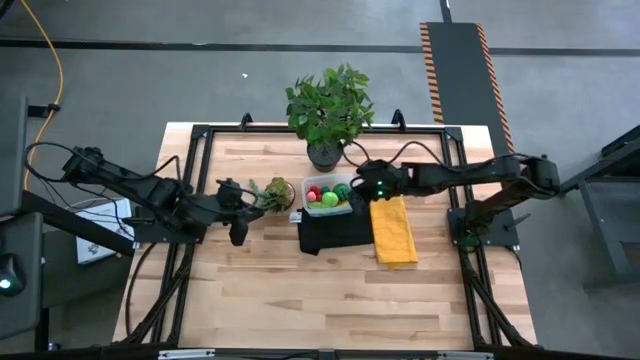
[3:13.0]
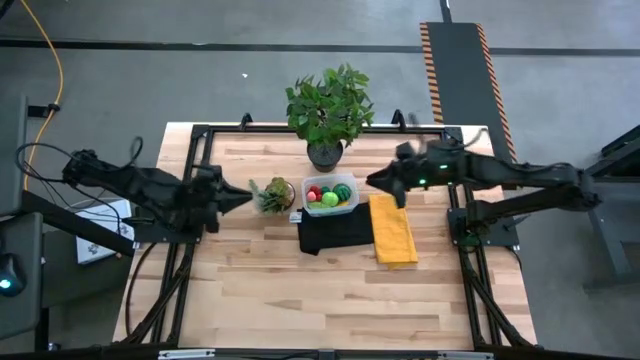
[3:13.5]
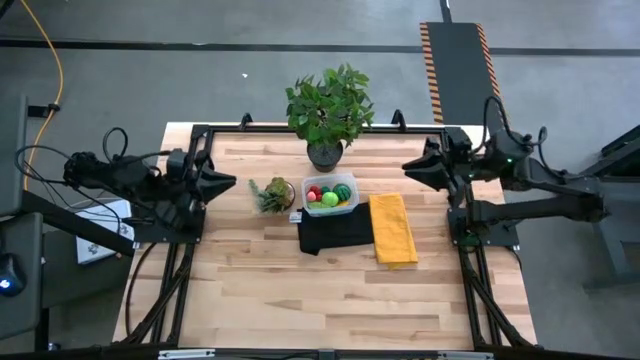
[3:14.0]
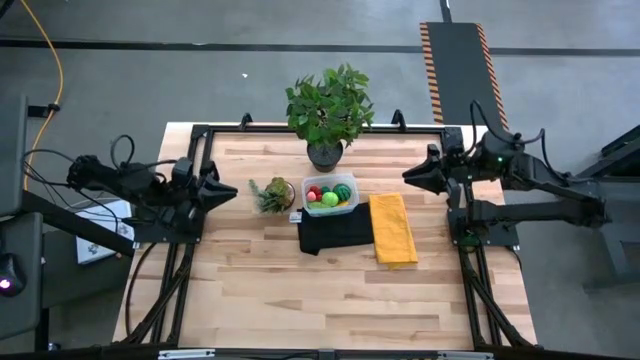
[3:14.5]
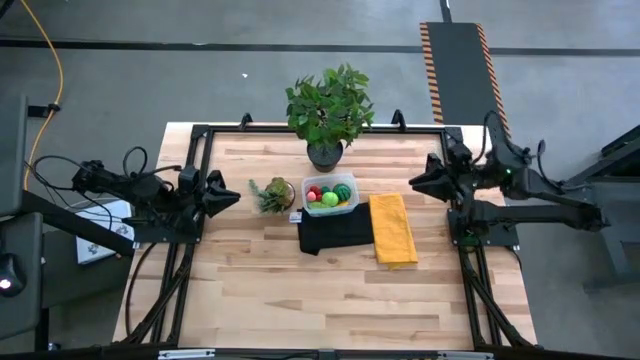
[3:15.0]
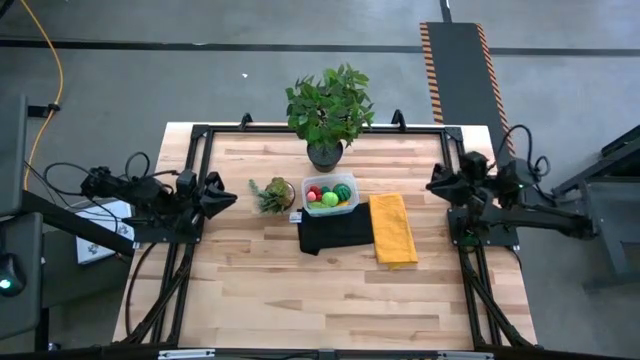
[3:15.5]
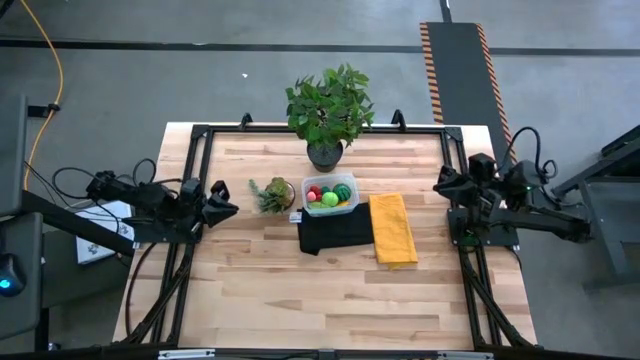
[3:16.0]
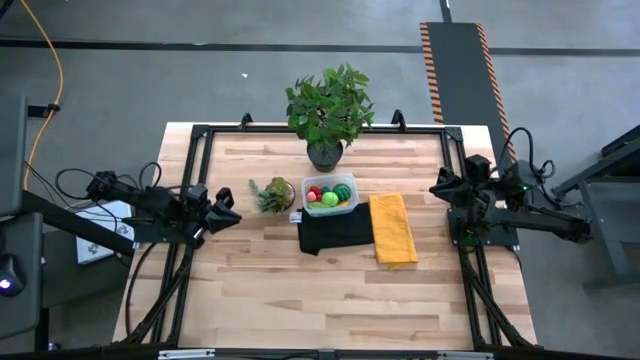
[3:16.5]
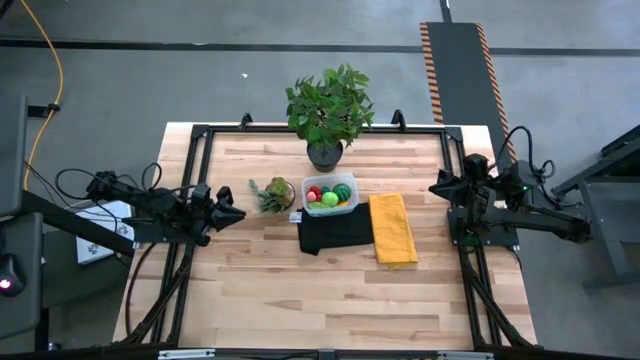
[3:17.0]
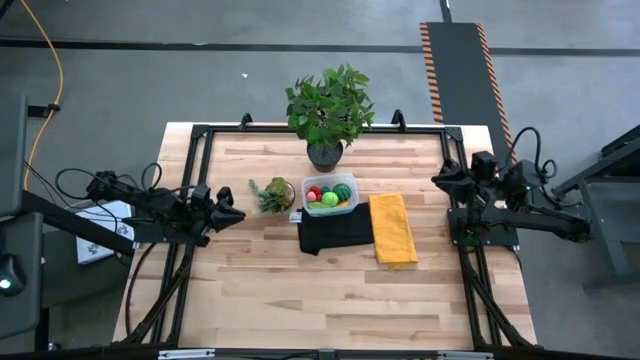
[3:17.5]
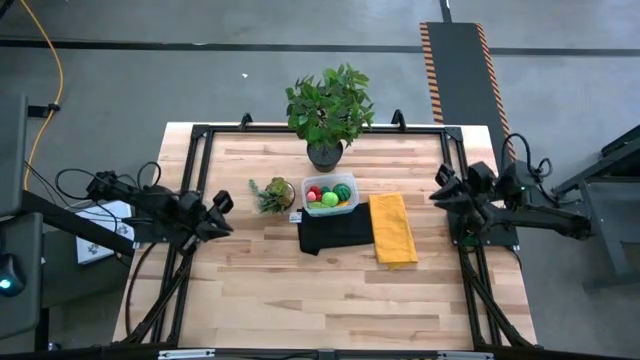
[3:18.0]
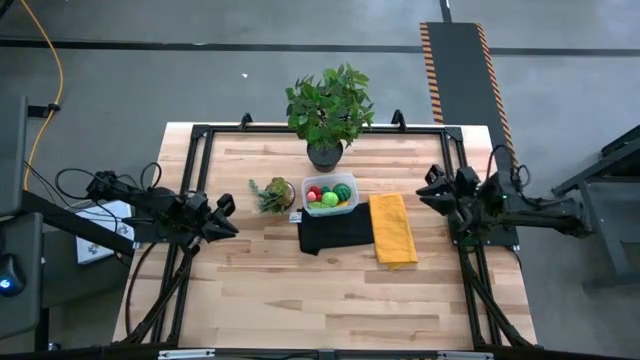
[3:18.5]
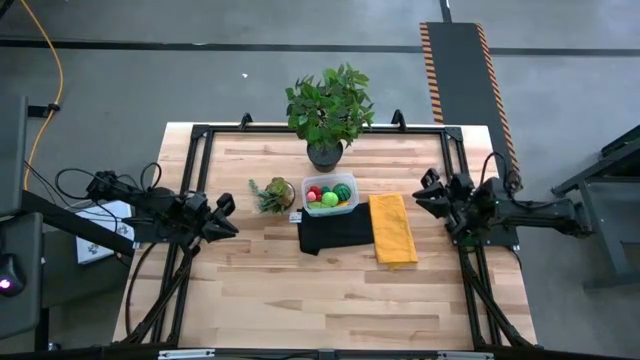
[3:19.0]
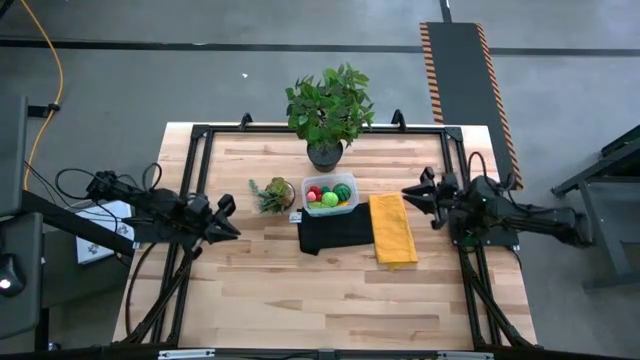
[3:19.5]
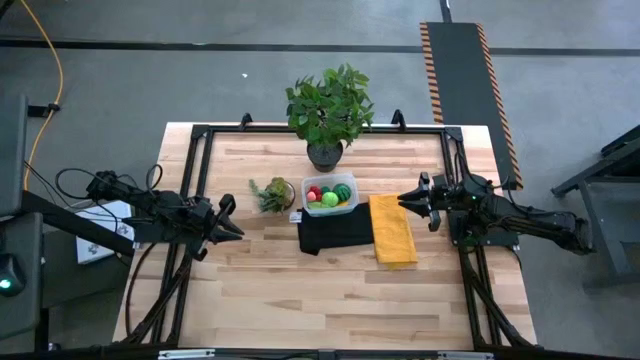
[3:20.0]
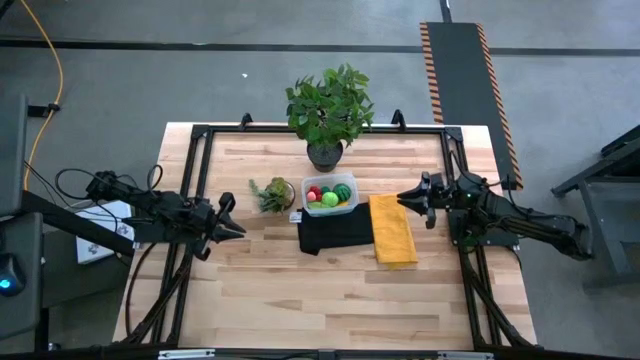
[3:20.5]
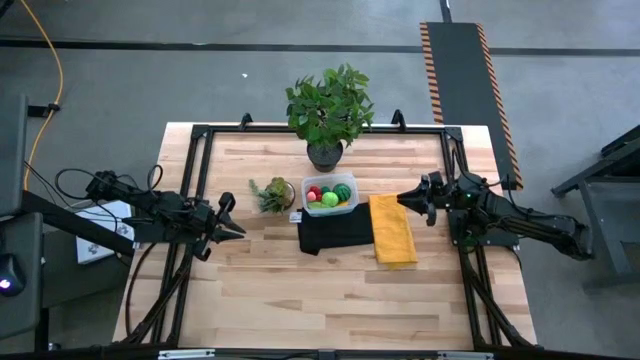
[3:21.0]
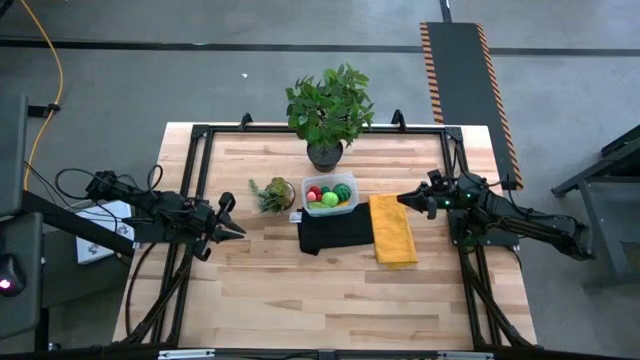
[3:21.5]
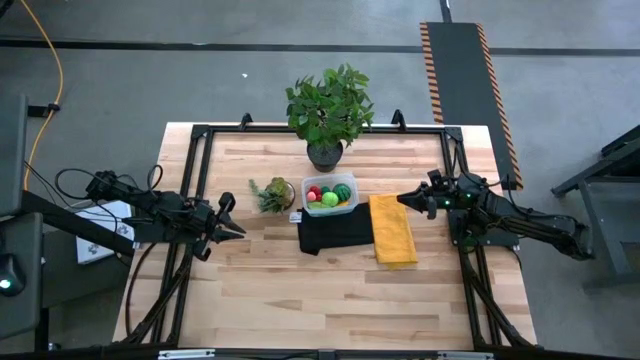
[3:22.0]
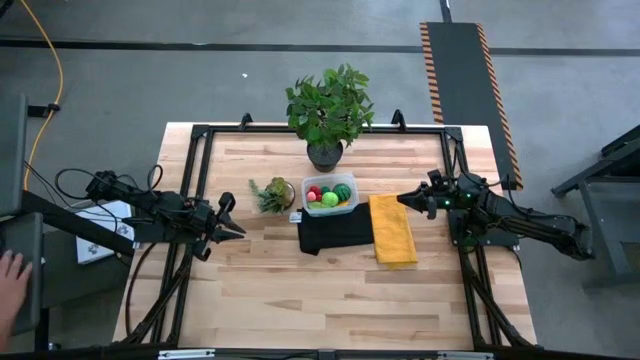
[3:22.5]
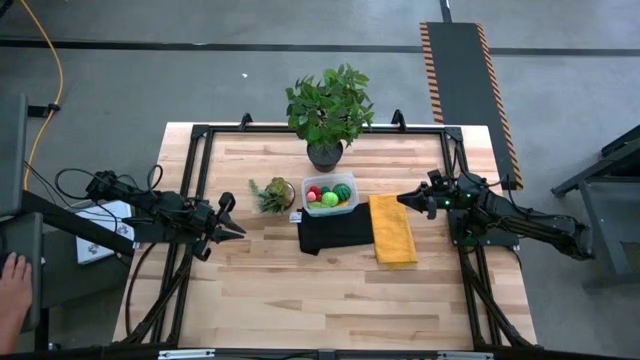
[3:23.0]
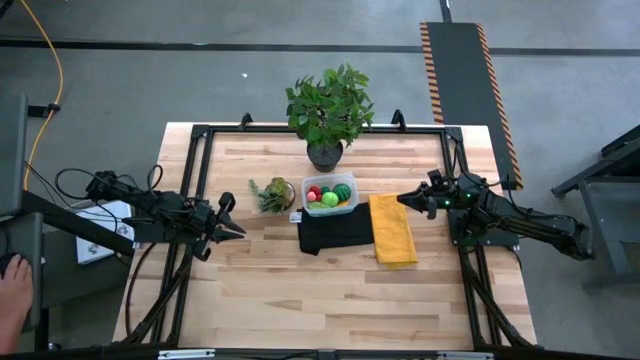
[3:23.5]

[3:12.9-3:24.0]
Task: Pick and placing Produce into tupperware
Return to Home Position

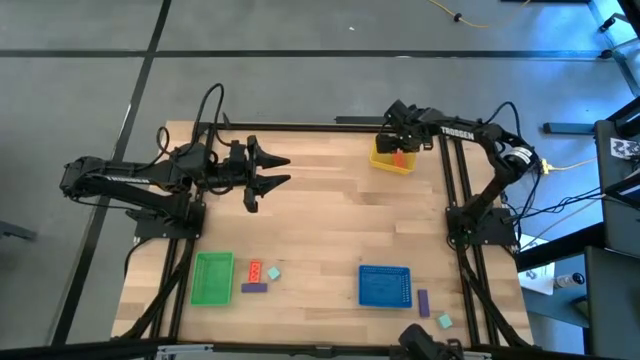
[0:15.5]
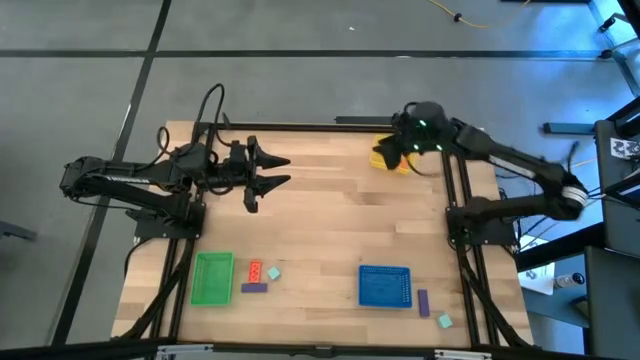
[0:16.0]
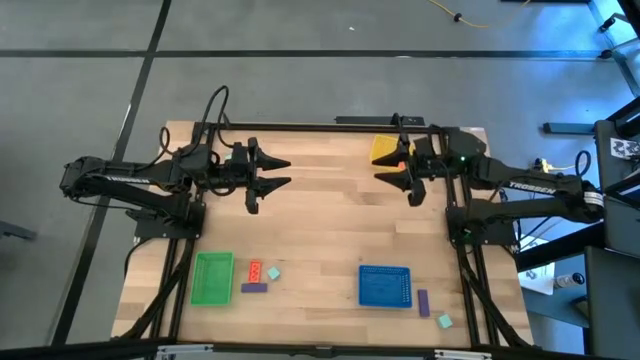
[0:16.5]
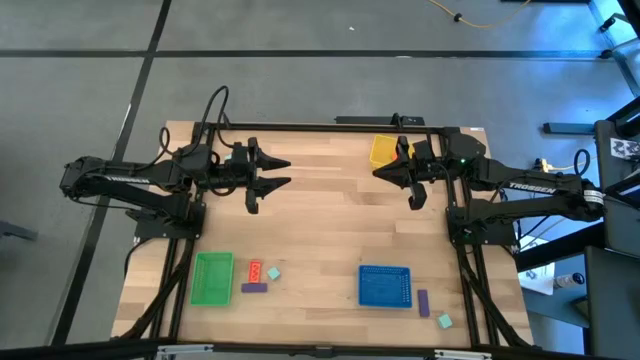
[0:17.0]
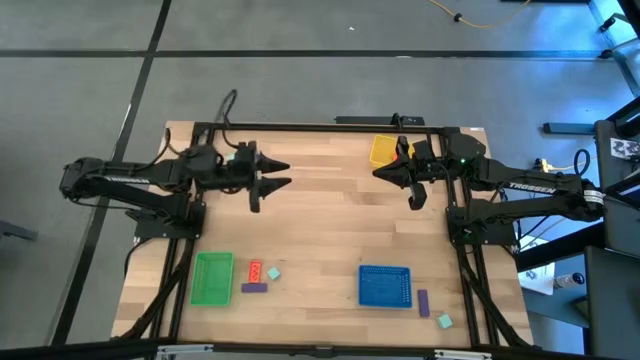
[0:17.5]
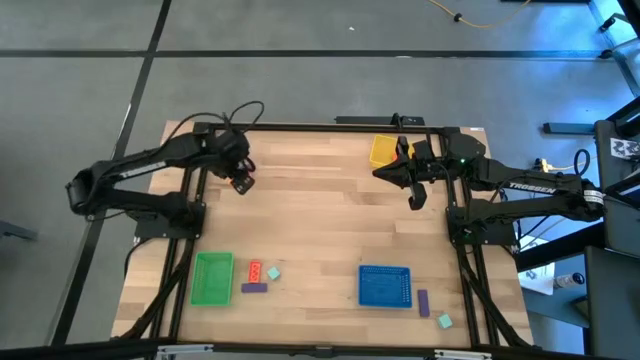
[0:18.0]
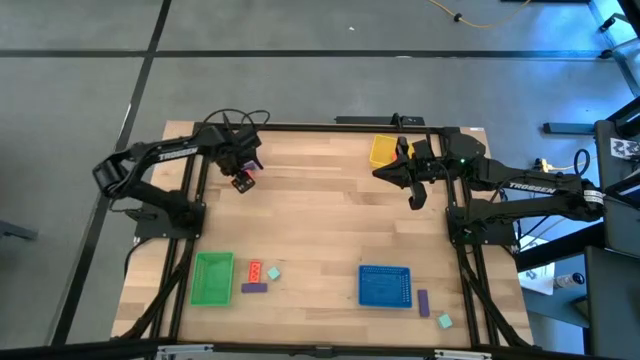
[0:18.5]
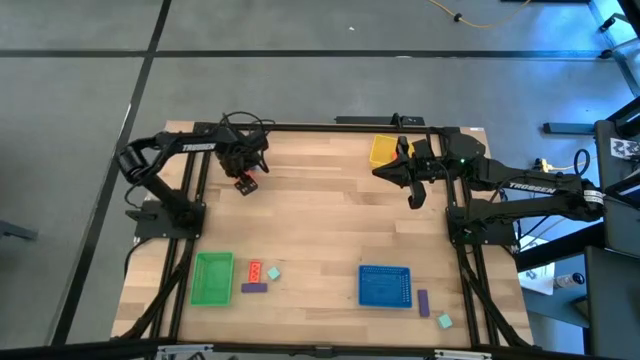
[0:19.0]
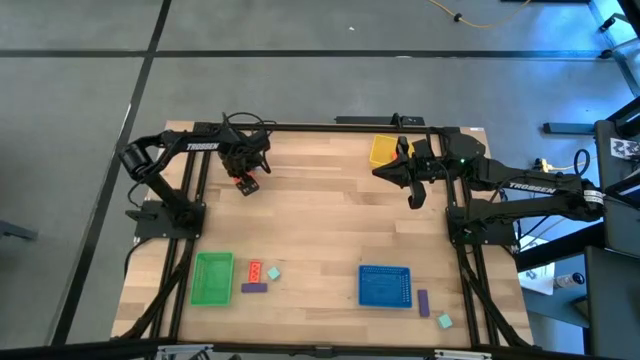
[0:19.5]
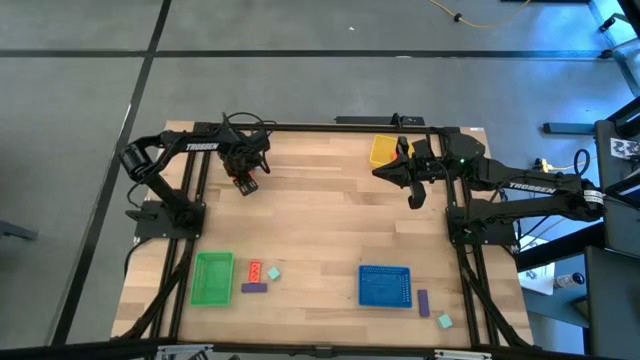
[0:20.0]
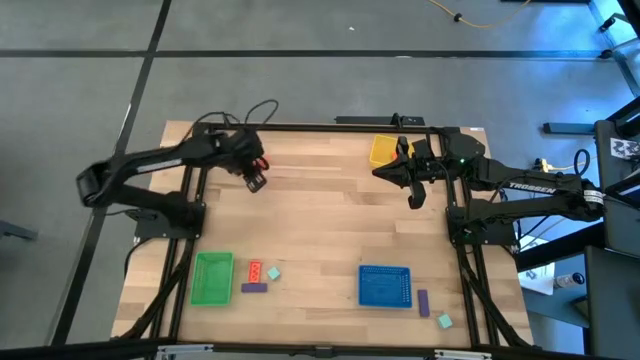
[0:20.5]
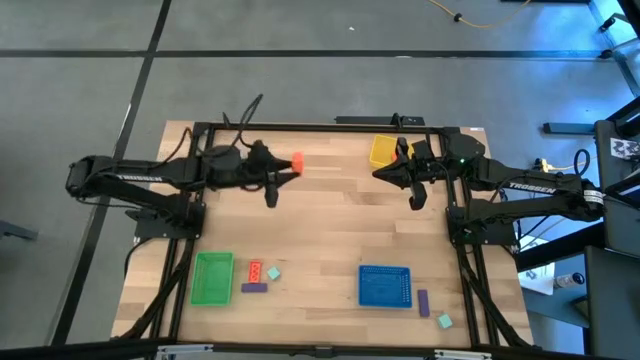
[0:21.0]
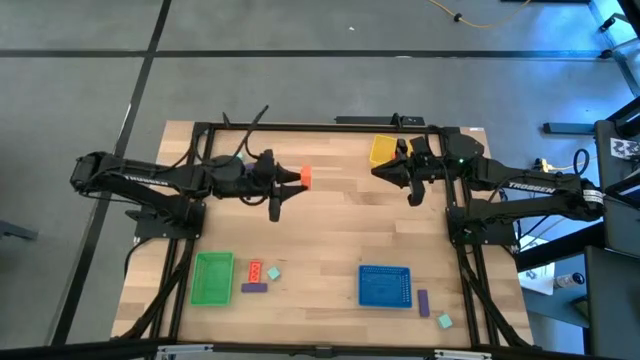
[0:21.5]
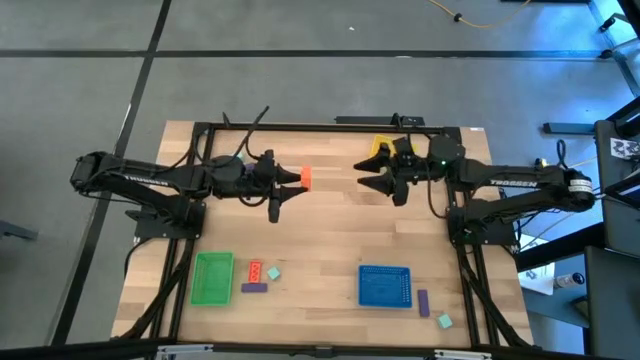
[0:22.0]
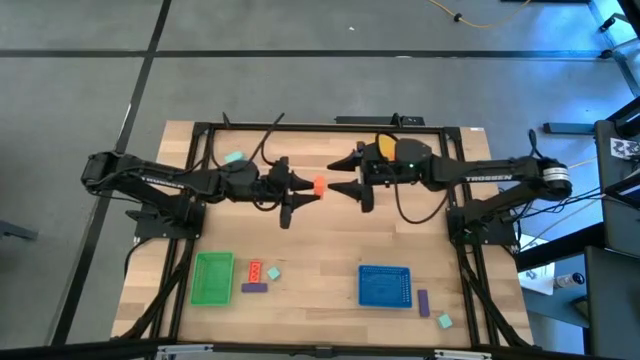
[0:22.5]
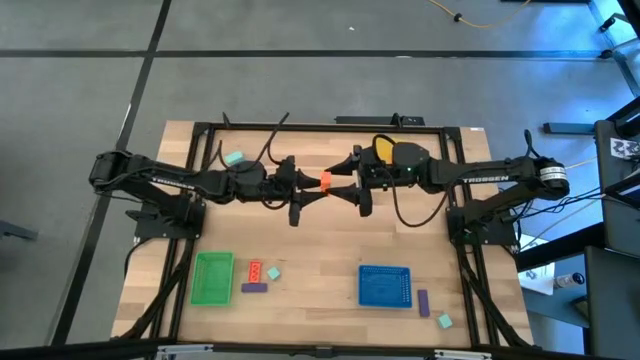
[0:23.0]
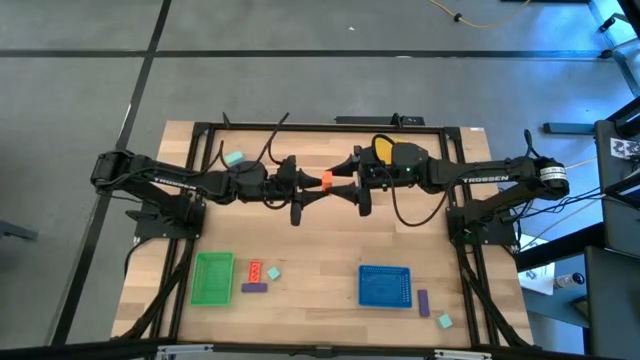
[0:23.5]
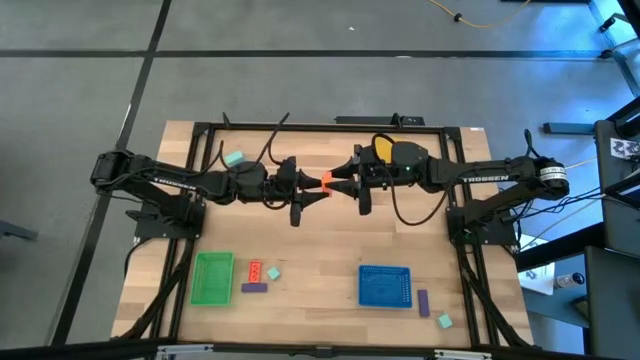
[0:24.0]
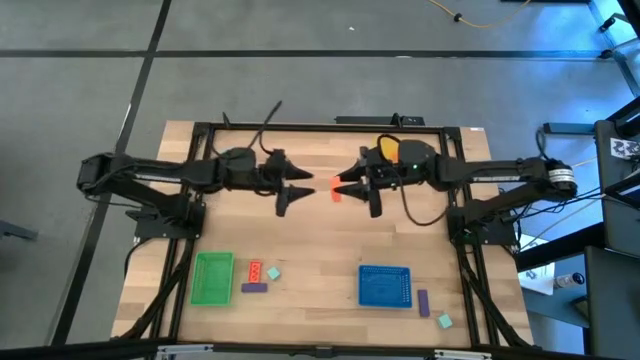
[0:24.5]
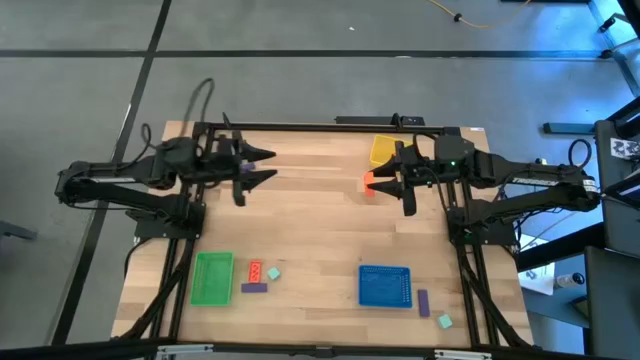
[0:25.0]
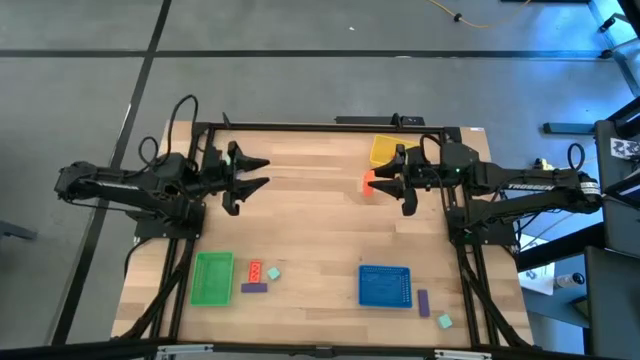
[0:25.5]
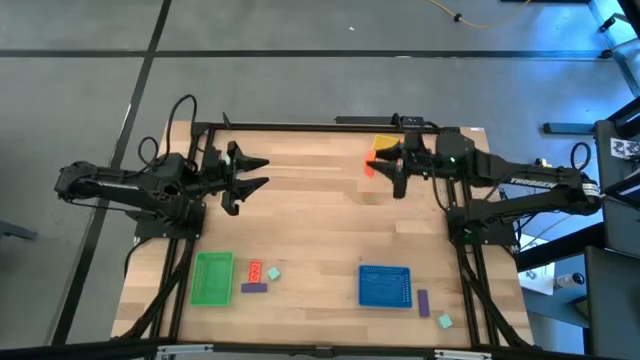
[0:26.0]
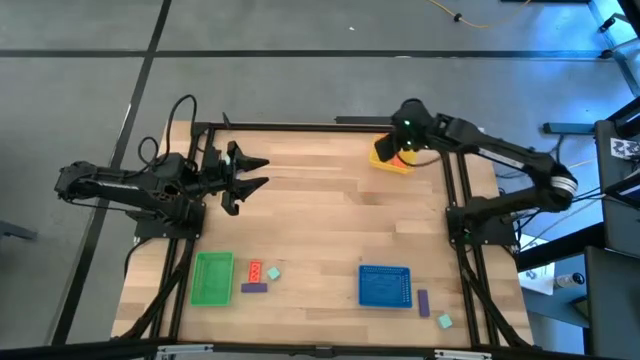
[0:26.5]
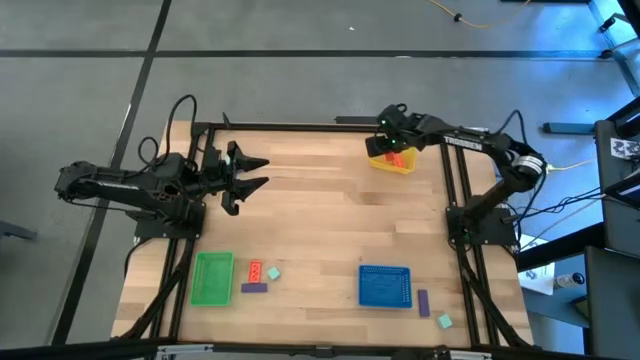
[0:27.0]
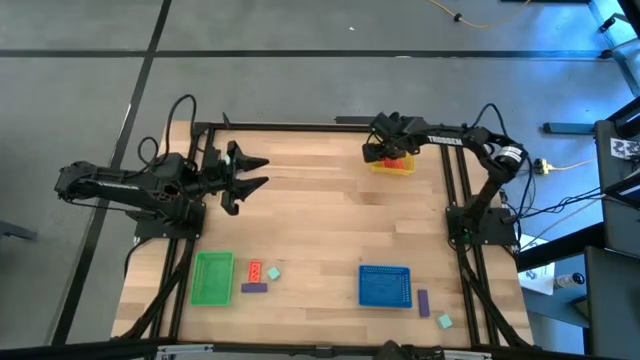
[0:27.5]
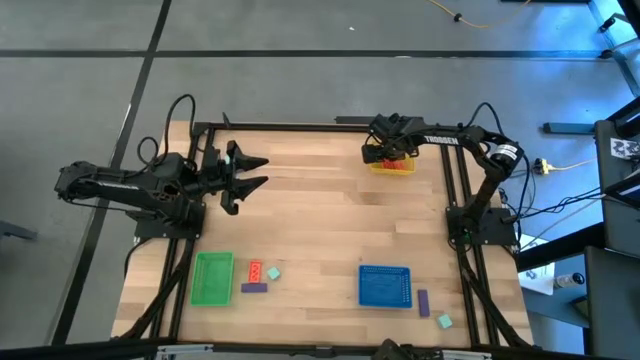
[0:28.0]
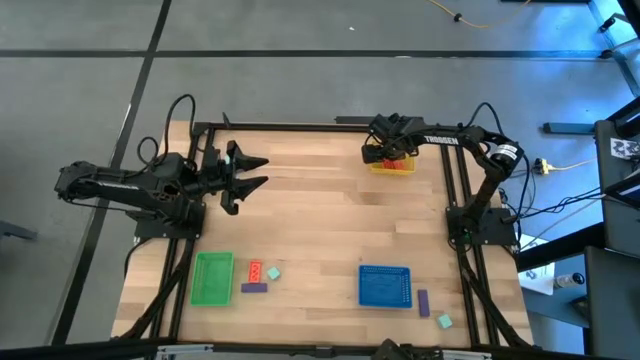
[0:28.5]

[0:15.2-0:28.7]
Task: Sort & place blocks by color
Put the top orange gamepiece into the yellow bin
